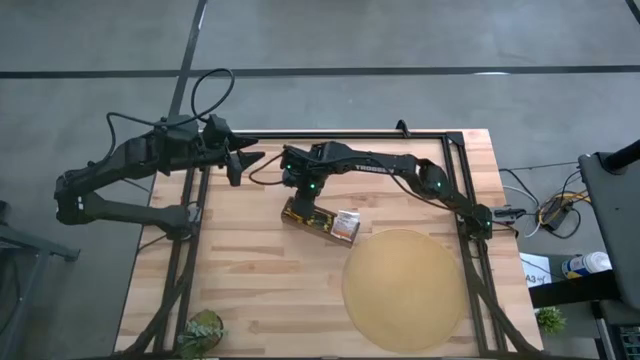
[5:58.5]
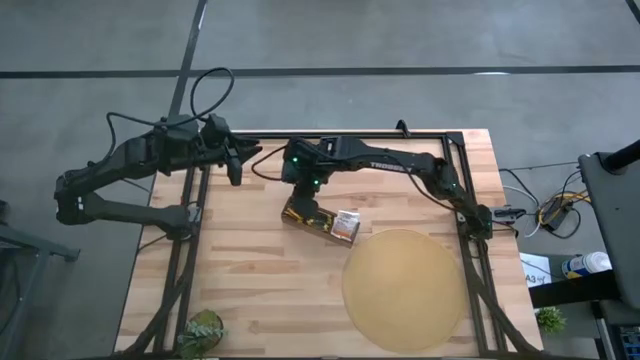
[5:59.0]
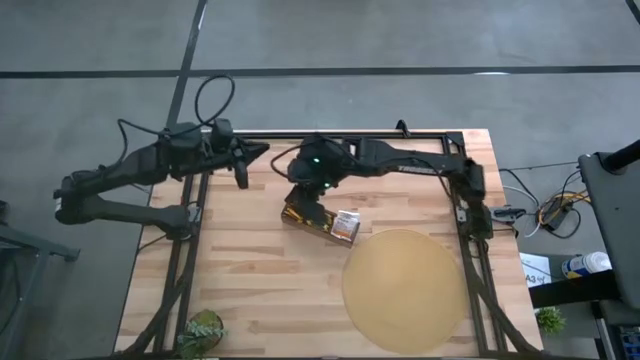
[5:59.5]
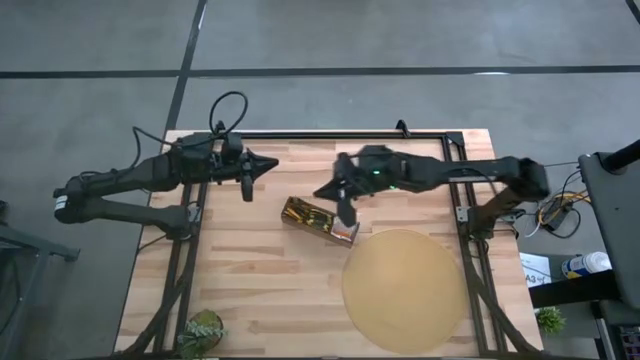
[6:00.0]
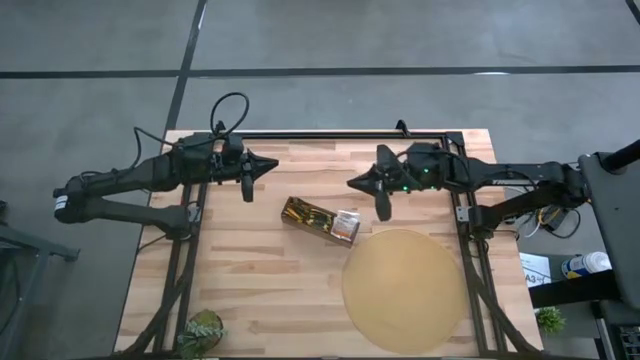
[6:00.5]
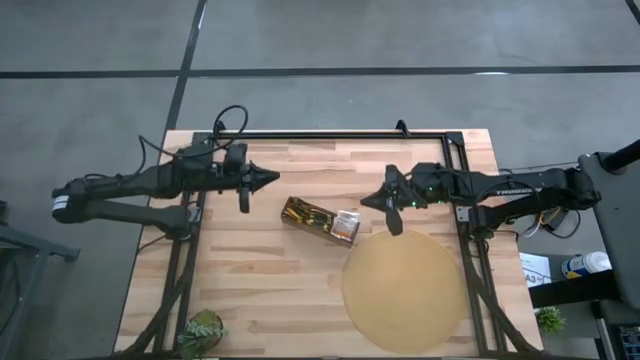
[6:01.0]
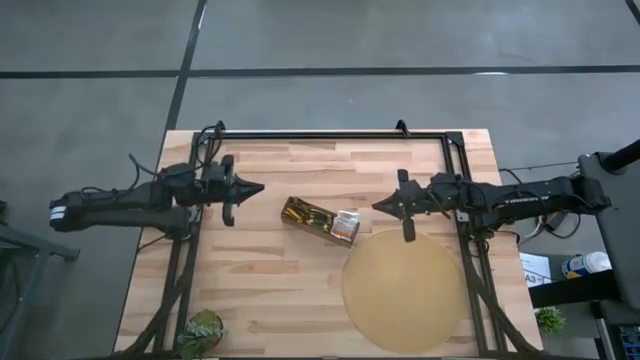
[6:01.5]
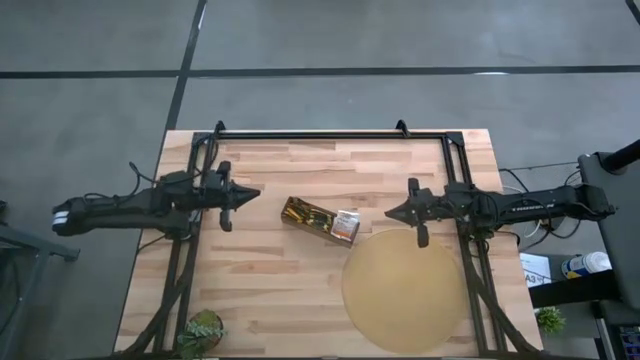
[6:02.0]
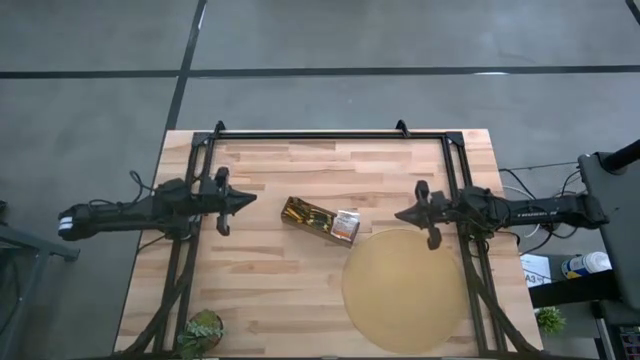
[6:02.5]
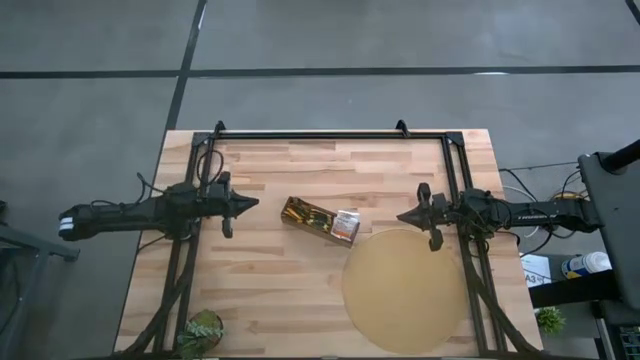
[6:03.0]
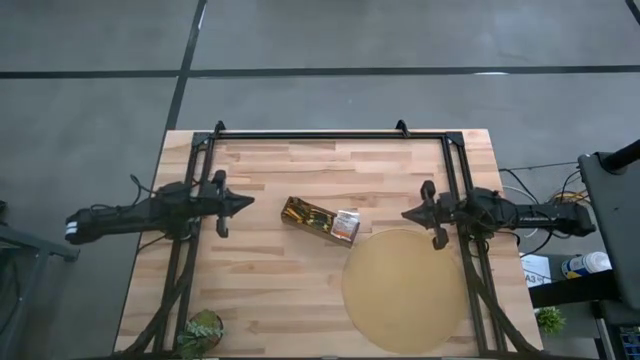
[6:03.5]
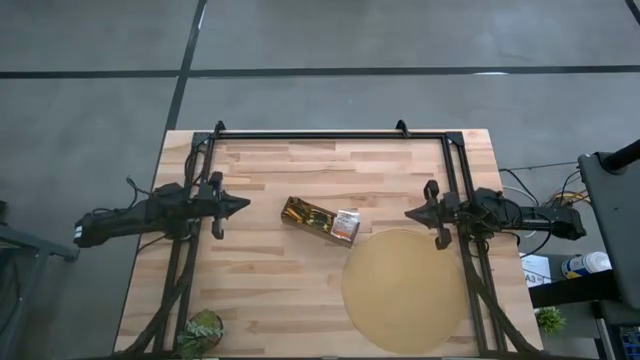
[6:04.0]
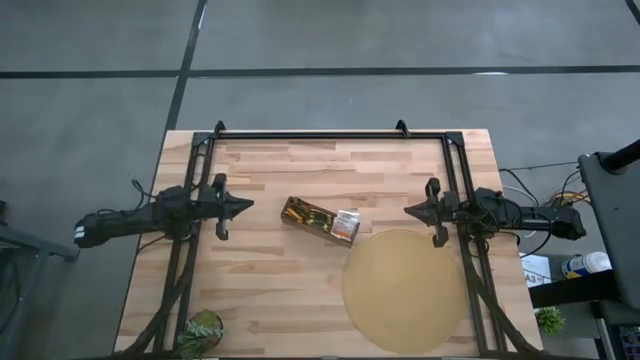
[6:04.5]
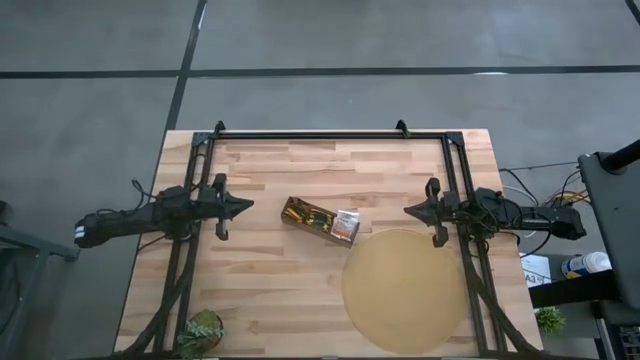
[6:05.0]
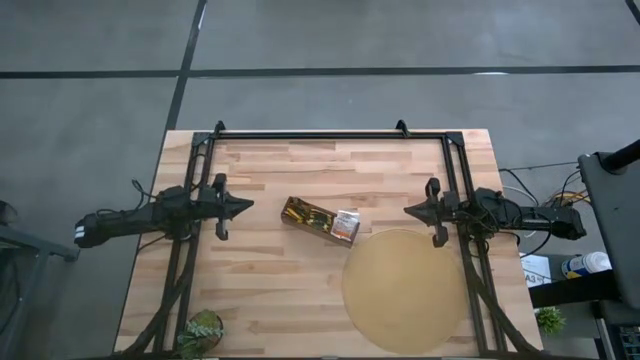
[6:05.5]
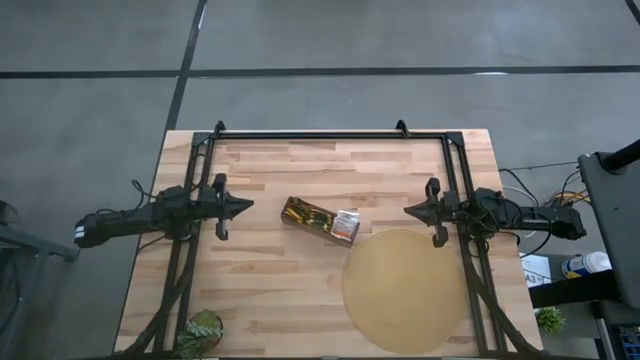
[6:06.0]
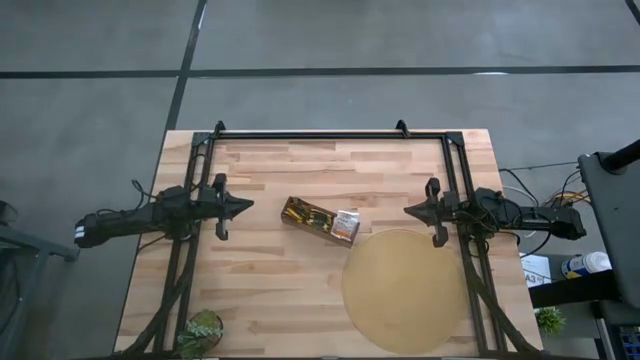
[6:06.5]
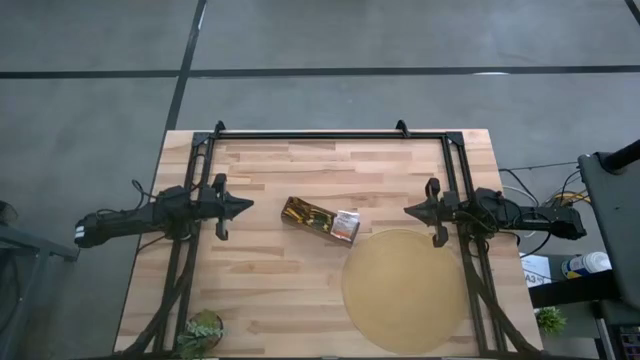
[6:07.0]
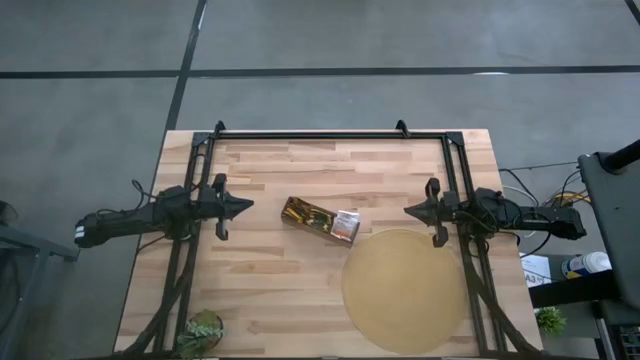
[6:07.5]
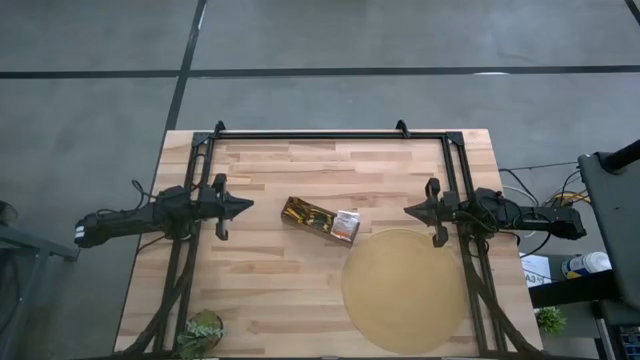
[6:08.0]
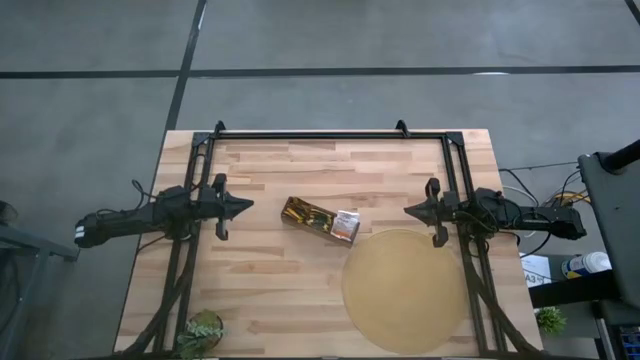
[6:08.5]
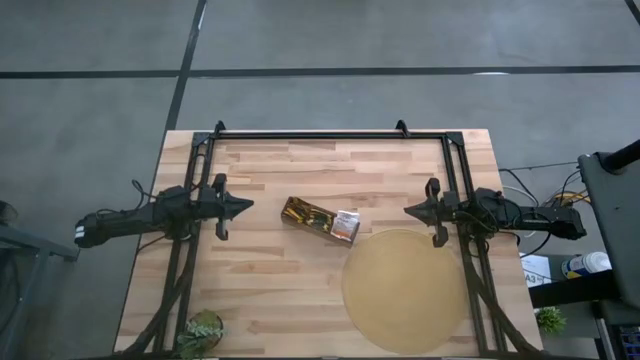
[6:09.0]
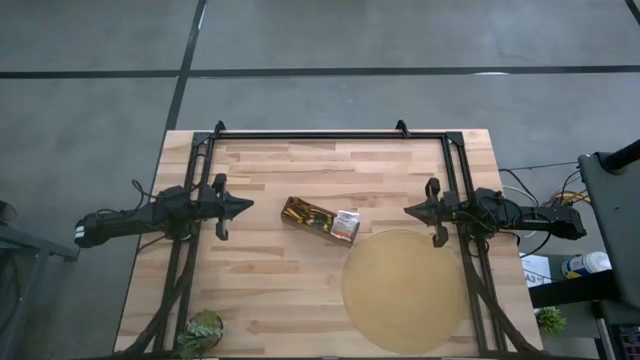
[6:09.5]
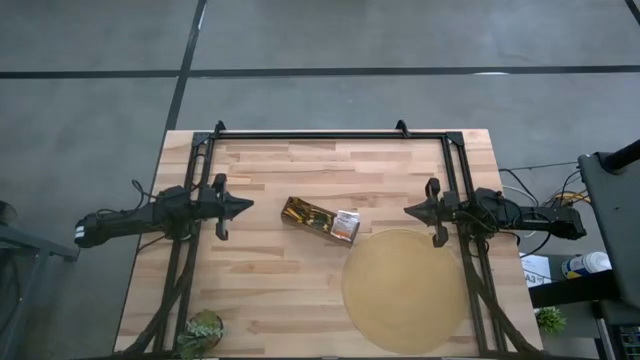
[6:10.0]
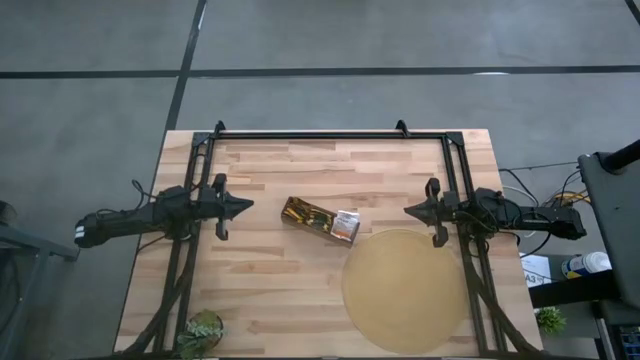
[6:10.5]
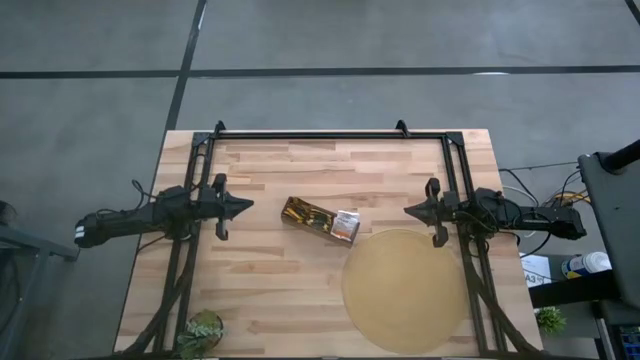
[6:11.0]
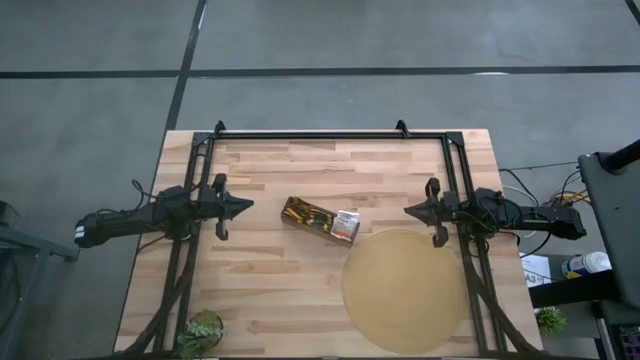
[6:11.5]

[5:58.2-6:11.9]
Task: Pick & Place Tea
Return to Home Position

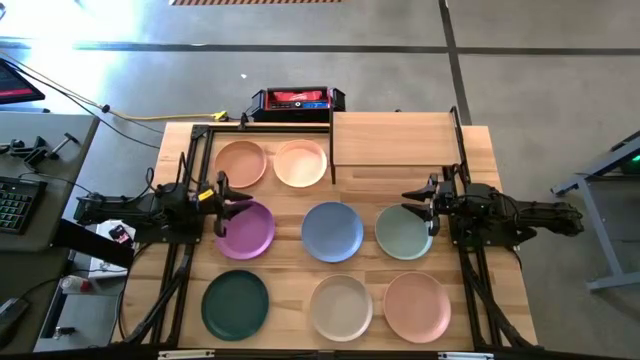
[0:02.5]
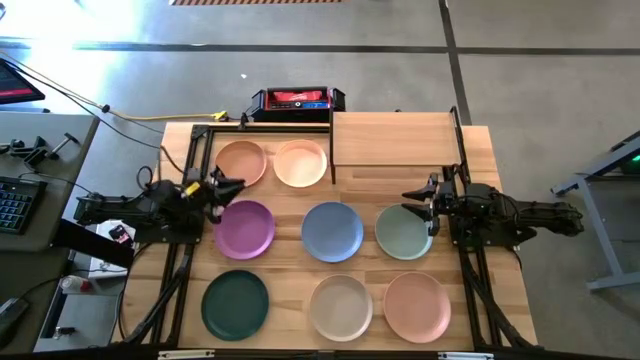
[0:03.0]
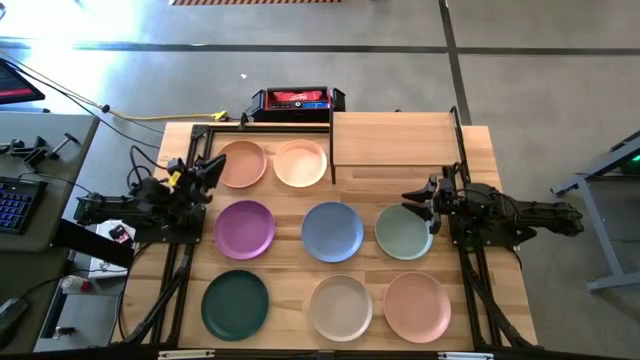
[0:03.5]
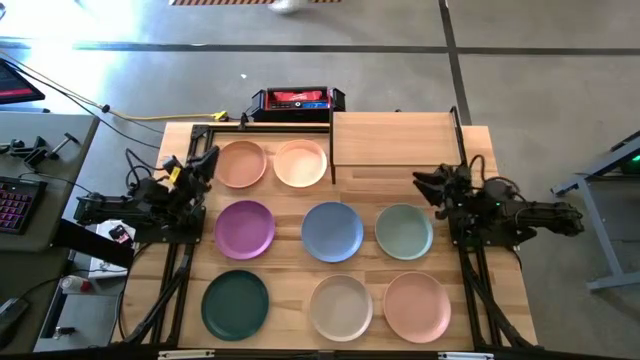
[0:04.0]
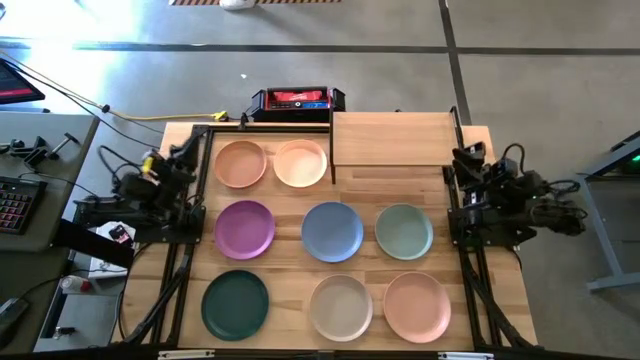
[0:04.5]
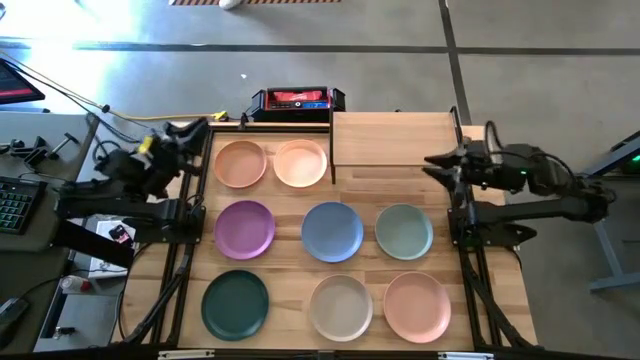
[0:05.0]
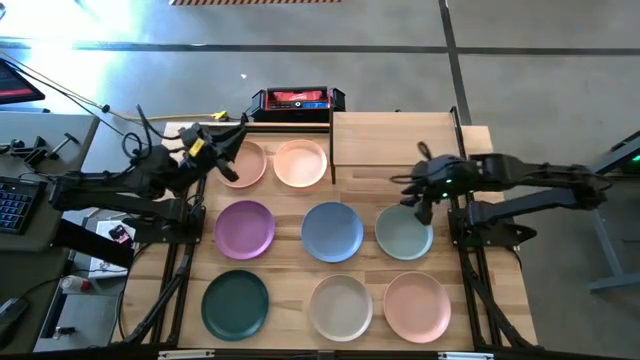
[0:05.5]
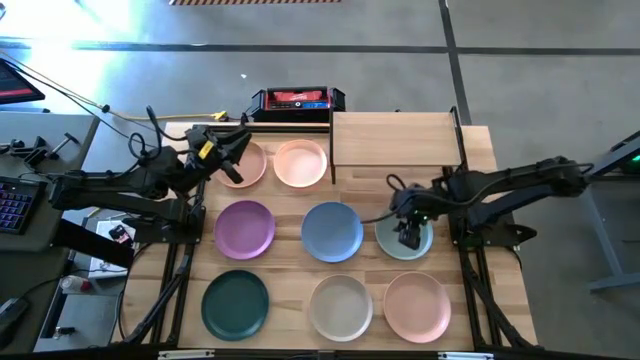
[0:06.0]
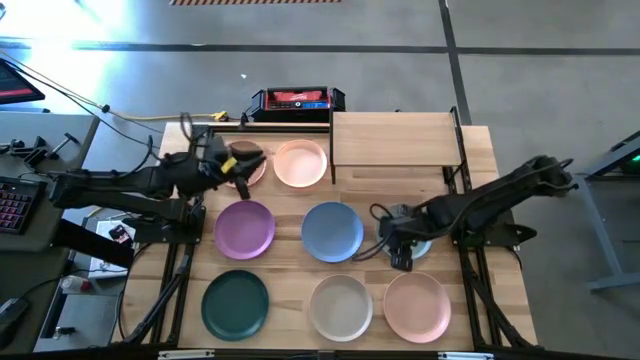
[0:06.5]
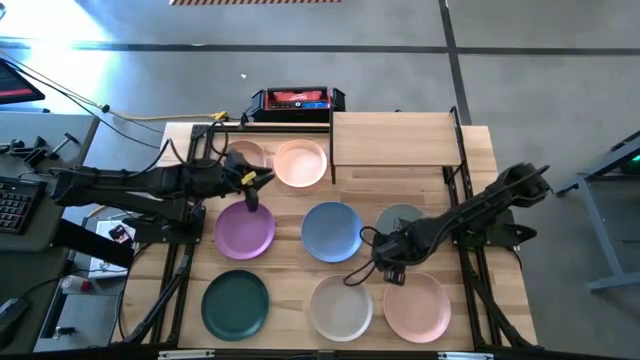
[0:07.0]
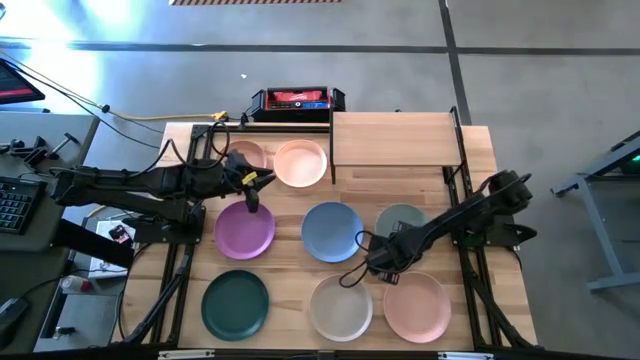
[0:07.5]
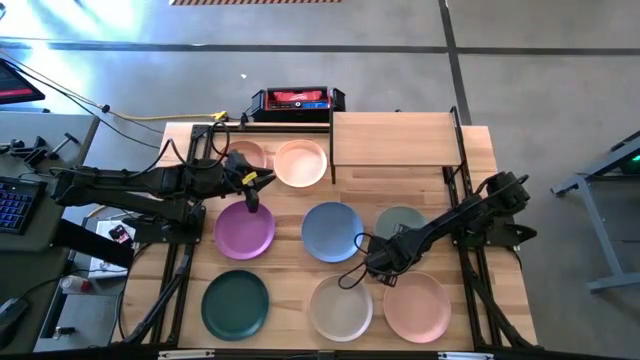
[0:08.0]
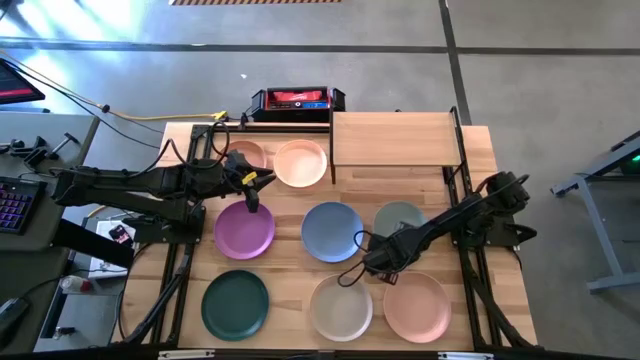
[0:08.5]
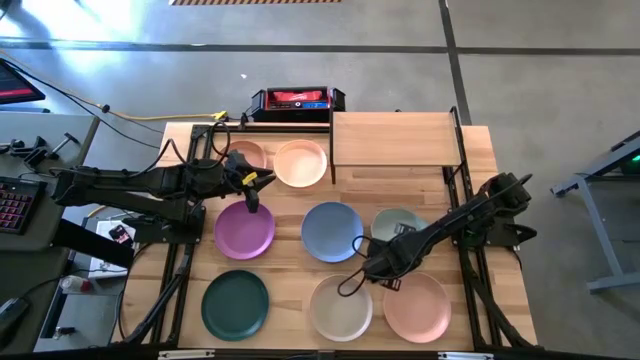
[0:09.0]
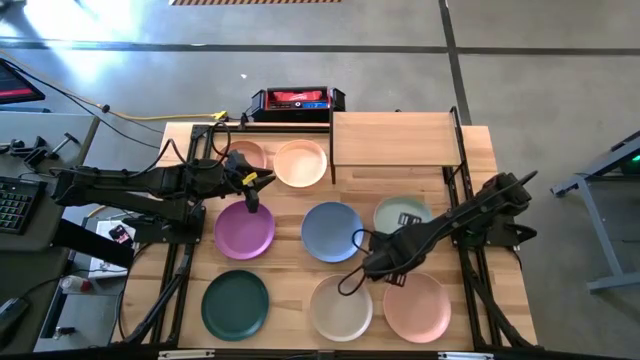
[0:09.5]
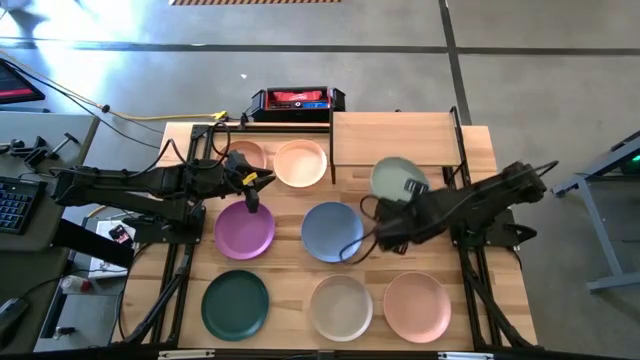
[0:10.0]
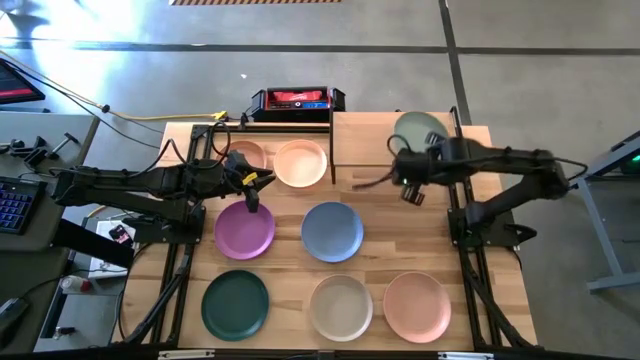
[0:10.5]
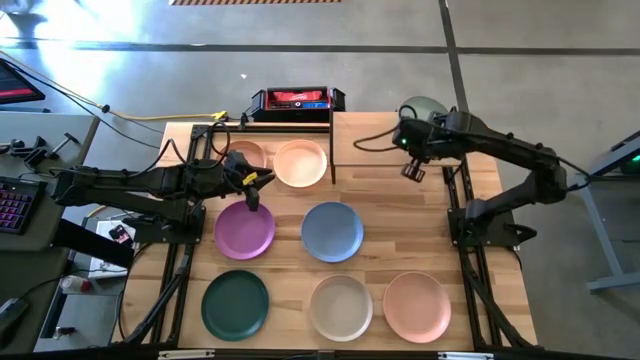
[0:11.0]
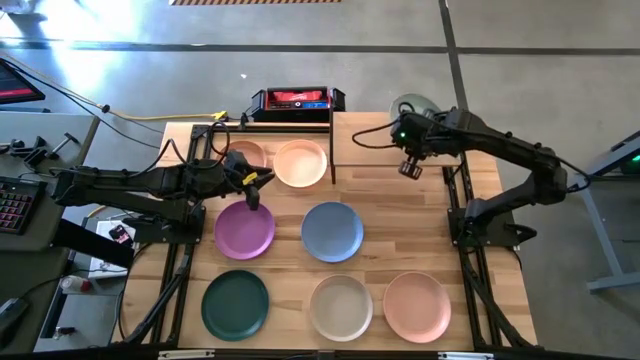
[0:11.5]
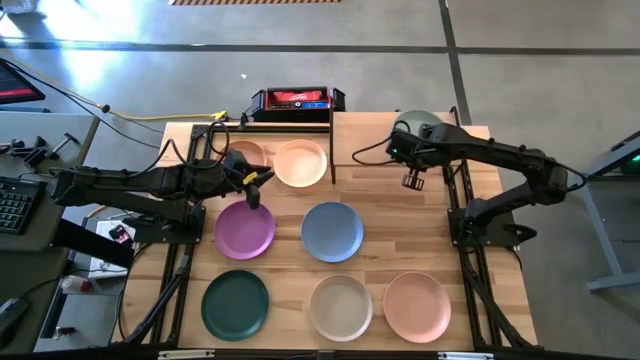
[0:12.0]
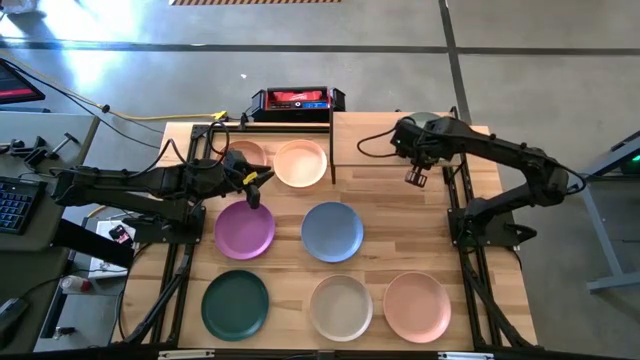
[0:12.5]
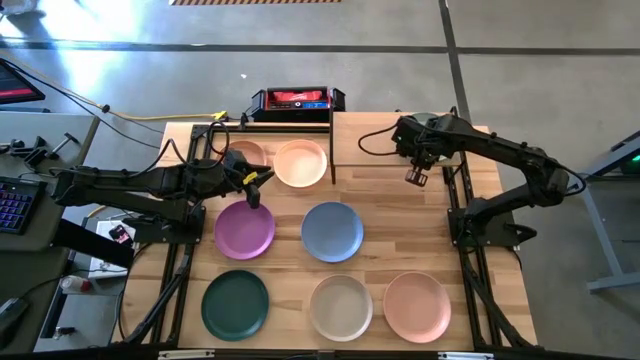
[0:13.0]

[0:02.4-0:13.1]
Task: Place and stack plates onto a shelf
Put the light blue plate on the shelf
